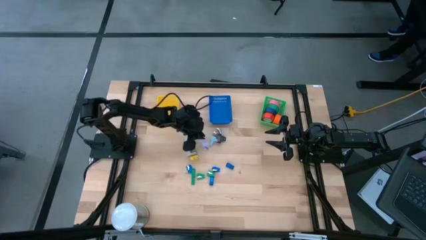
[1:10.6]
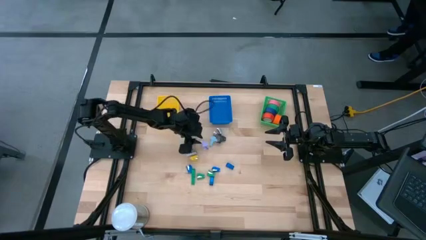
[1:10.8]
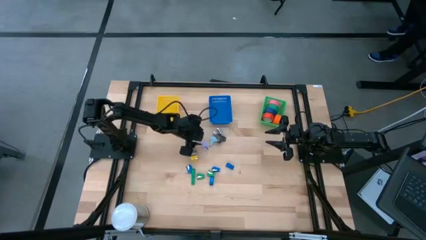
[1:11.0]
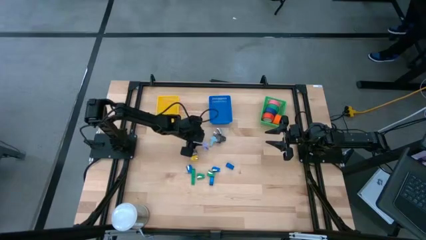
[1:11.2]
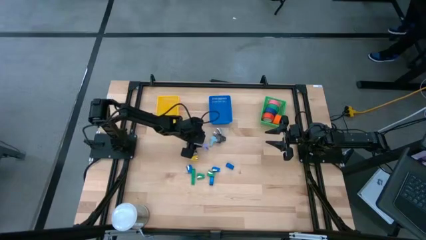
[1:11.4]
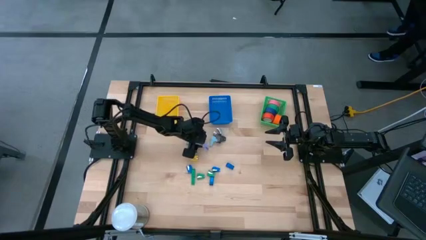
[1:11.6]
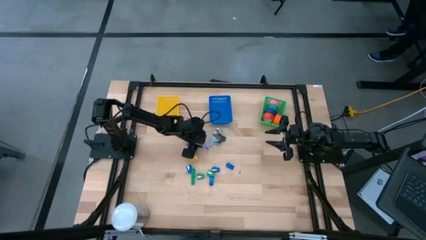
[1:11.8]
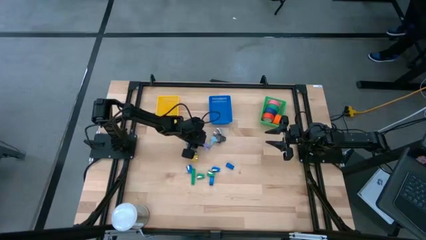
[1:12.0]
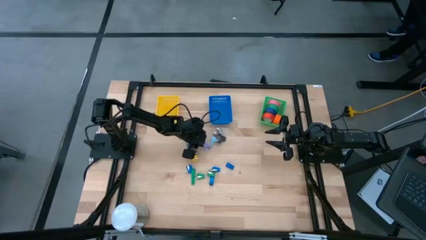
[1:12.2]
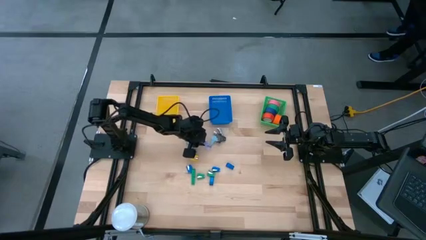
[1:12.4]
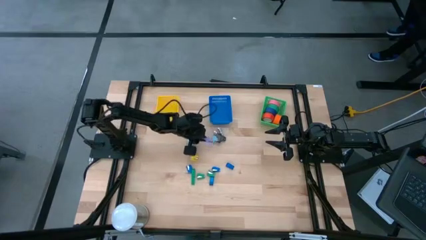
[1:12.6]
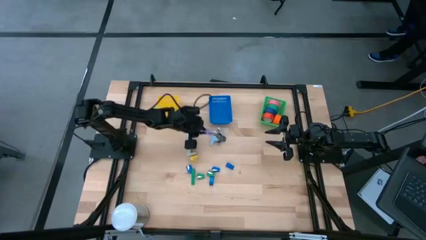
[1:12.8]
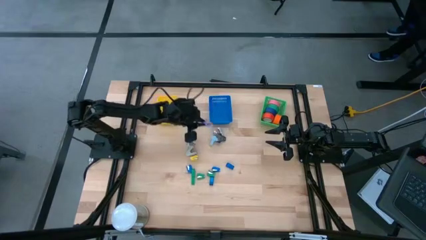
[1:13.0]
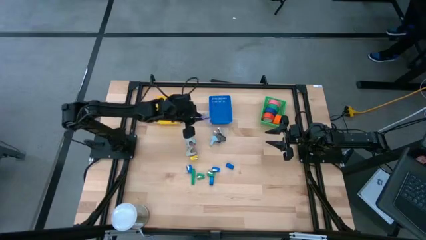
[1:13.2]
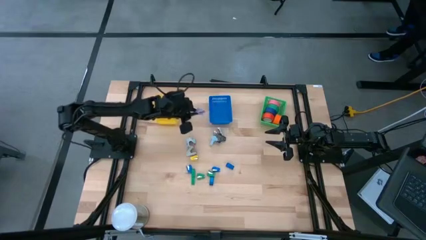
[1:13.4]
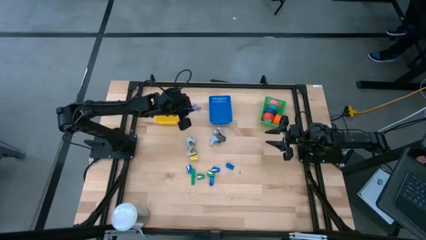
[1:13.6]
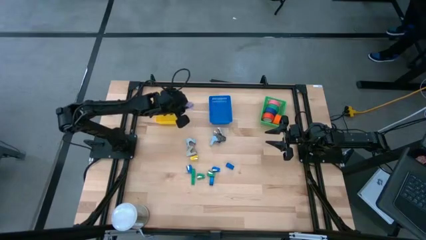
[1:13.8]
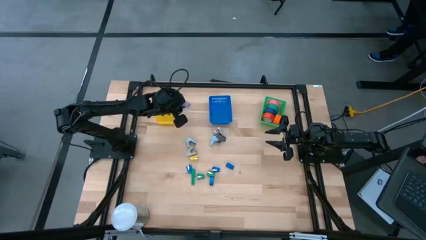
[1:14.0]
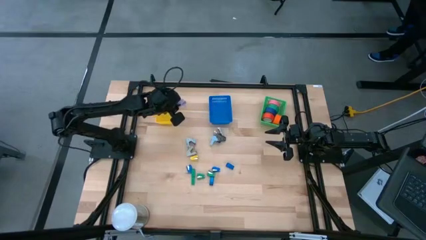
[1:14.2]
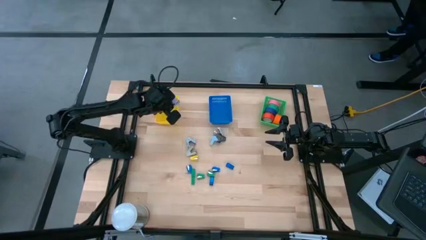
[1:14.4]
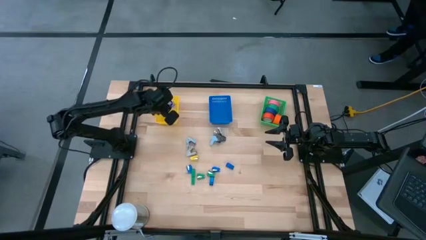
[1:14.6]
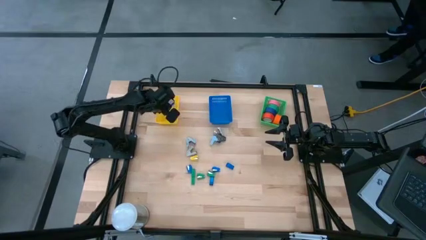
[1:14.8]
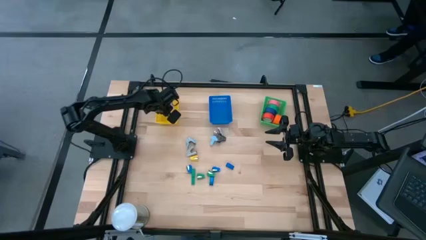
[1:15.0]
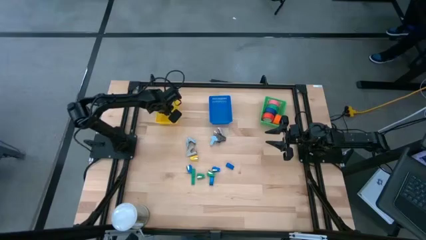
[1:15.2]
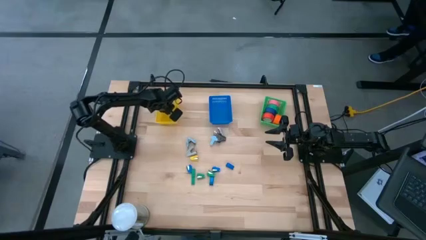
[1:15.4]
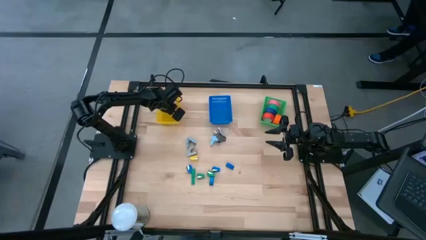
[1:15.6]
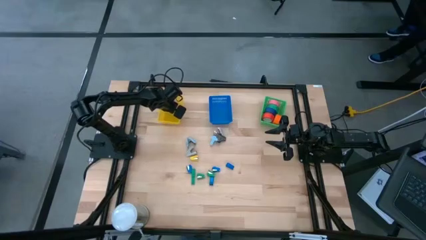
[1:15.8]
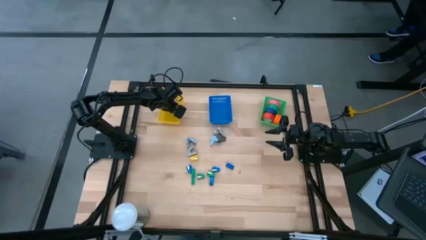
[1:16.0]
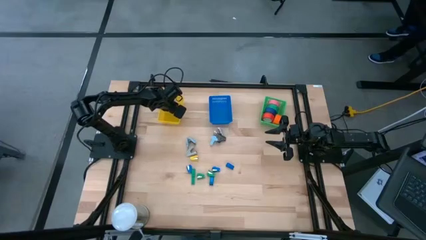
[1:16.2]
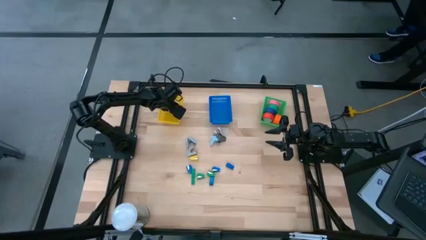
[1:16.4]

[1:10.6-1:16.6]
Task: Pick and place Stapler, Stapler remover, tape
Put the violet stapler remover into the yellow basket

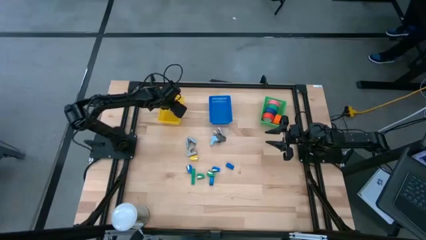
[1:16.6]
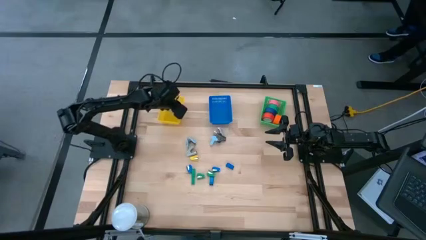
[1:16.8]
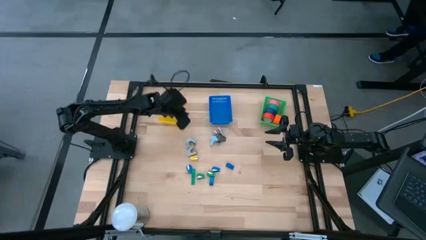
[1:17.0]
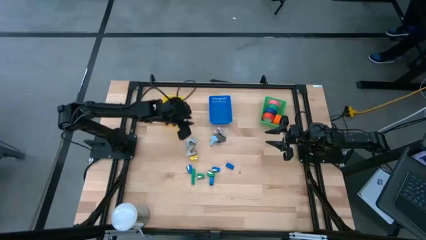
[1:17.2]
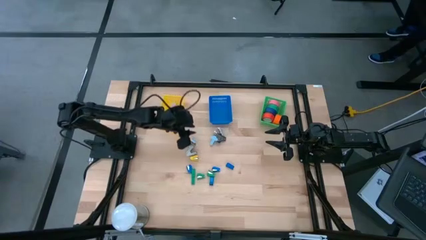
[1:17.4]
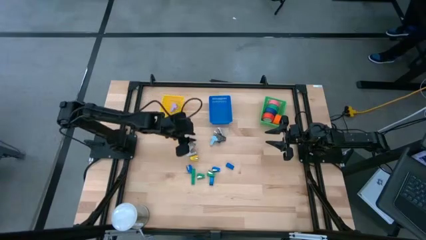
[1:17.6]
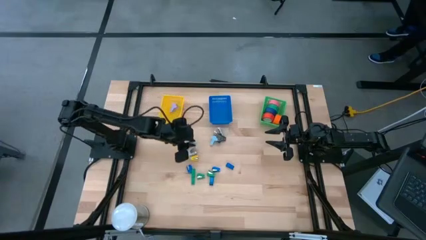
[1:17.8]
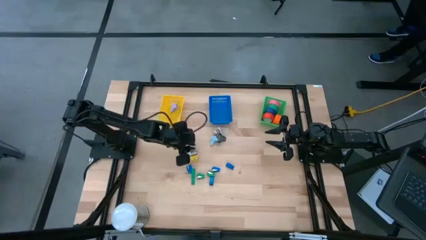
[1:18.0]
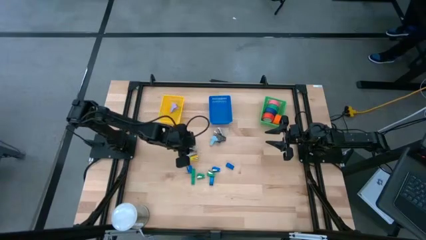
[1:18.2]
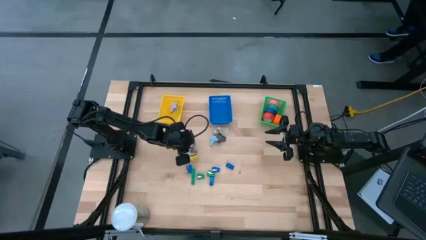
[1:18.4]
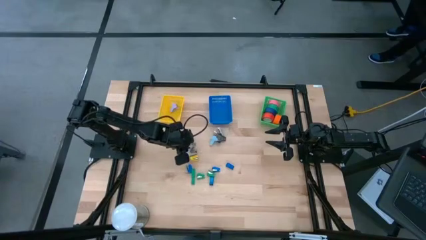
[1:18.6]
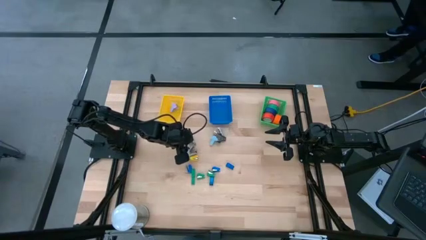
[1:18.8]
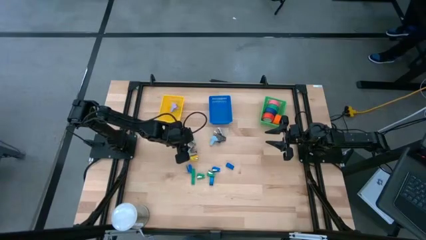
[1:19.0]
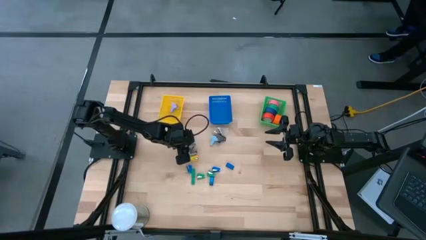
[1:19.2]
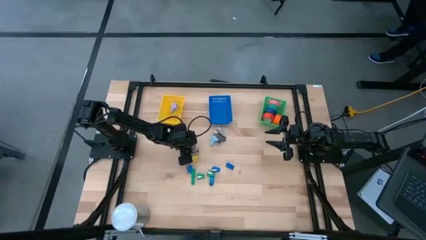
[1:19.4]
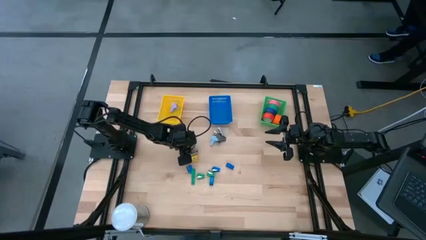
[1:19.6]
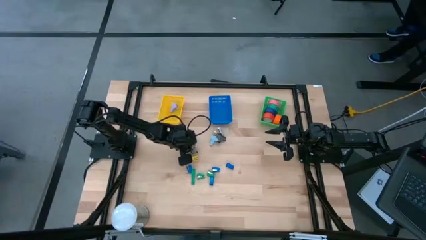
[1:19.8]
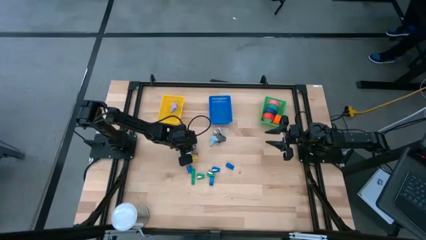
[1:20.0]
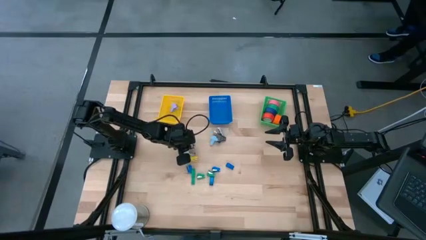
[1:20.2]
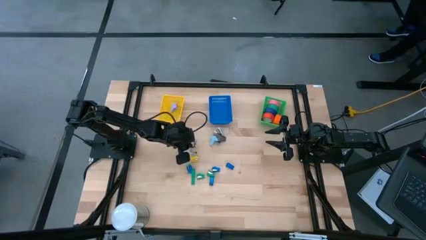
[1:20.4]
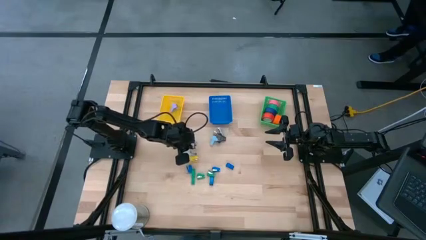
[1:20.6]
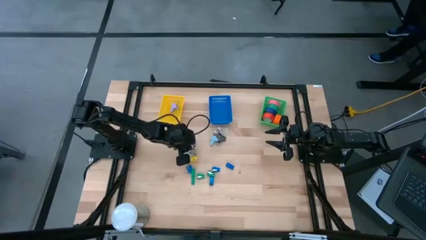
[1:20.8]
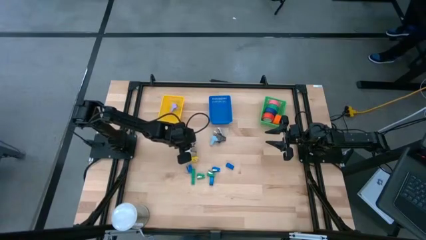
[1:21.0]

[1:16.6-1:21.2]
Put the gray staple remover into the yellow basket

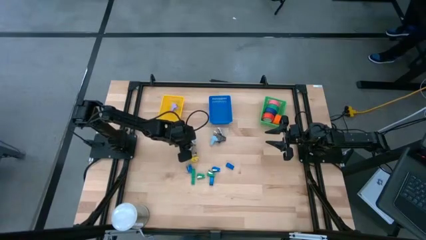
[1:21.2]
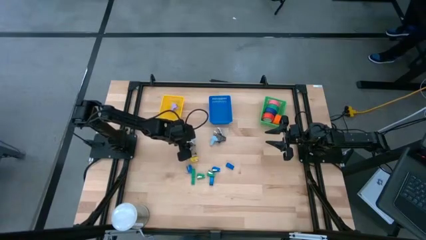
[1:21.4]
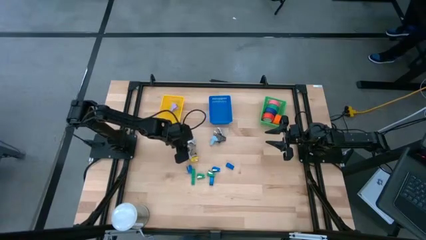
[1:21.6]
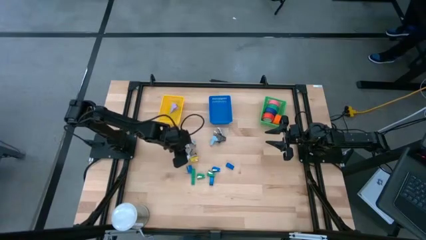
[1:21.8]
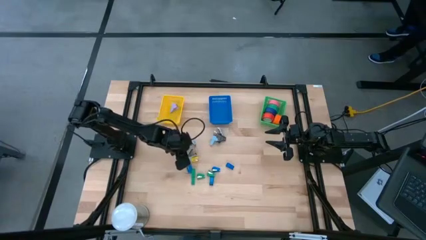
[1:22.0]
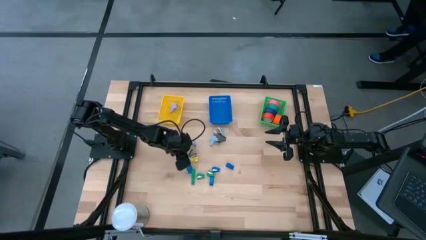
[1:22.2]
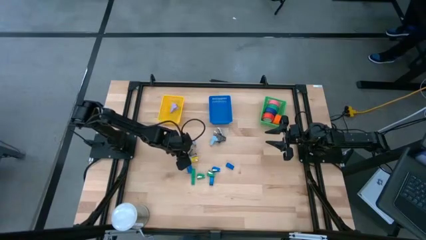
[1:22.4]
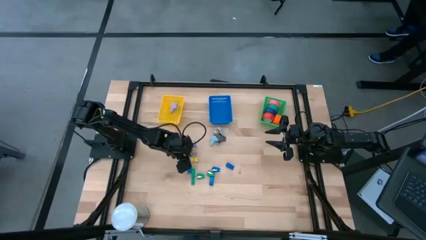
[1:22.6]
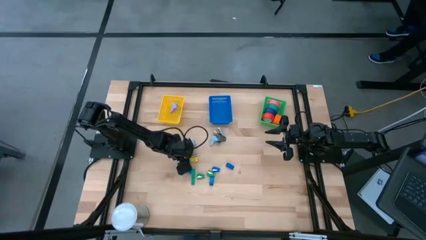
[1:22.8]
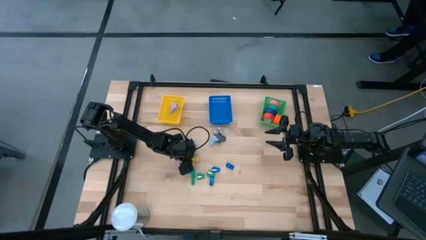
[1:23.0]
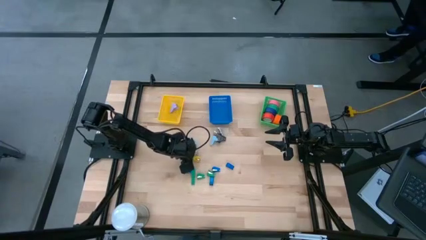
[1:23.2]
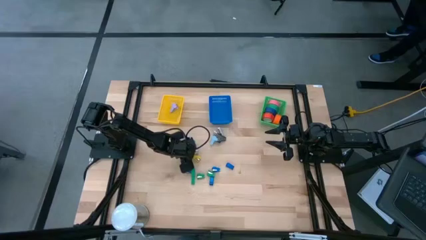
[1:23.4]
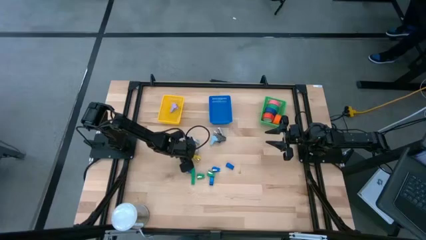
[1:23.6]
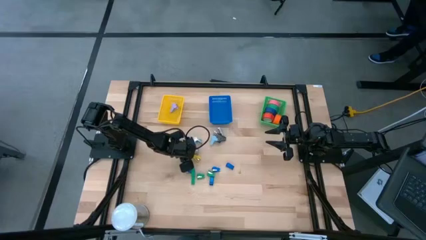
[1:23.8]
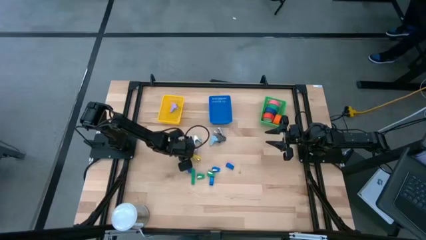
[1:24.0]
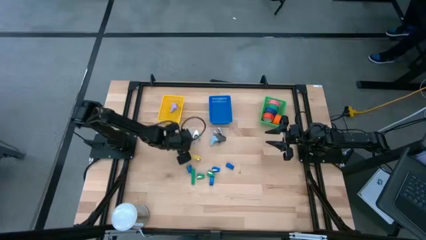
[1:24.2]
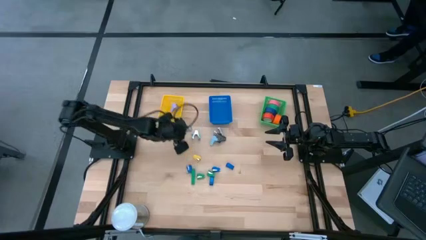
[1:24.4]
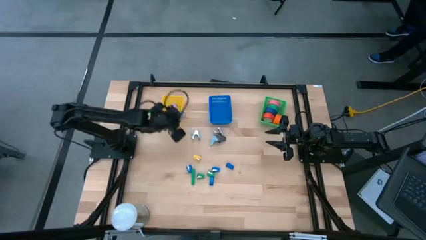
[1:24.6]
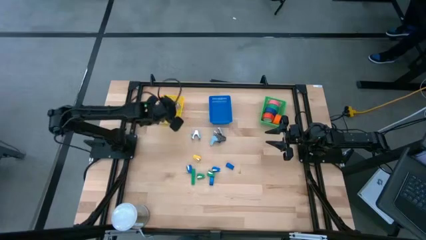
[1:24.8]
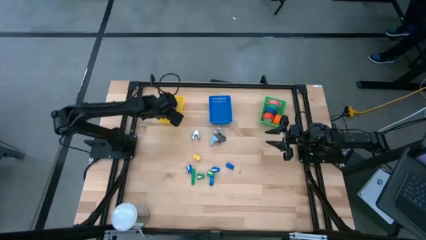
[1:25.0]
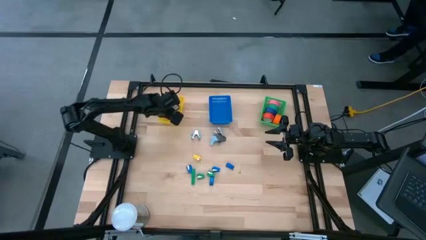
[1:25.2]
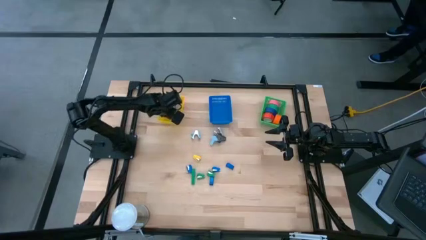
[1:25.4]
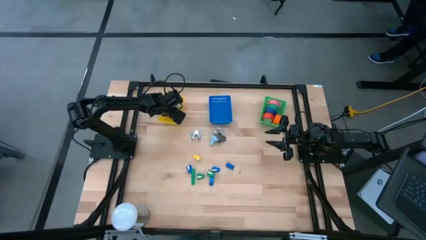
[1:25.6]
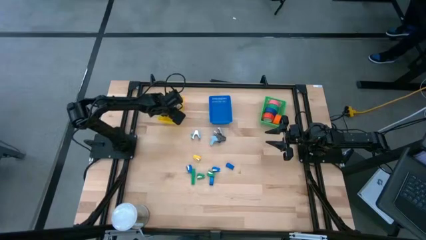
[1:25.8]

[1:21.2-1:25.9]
Put the gray staple remover into the yellow basket

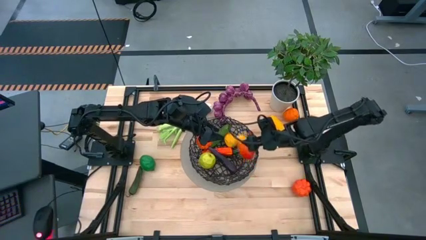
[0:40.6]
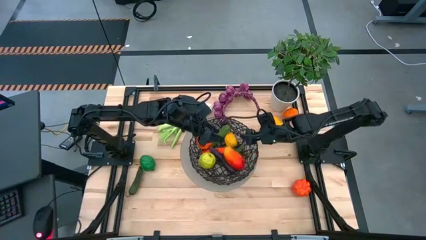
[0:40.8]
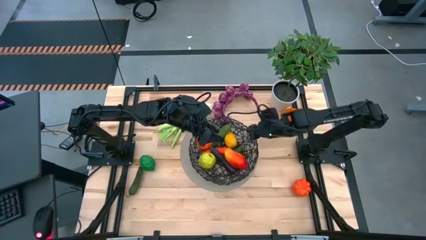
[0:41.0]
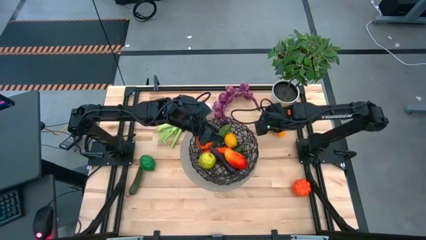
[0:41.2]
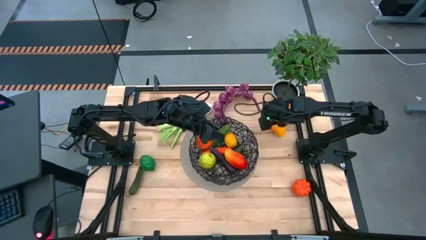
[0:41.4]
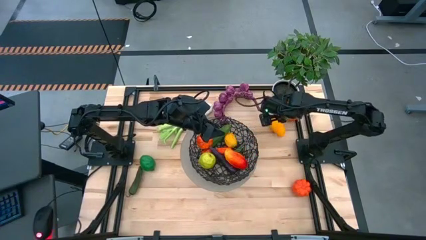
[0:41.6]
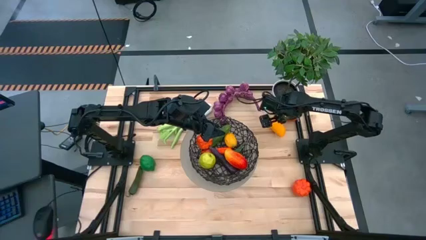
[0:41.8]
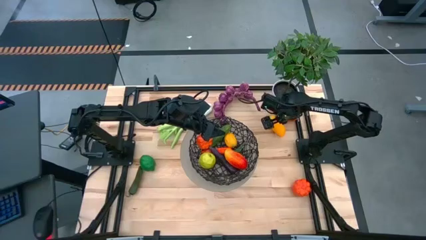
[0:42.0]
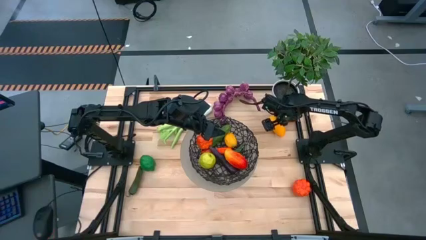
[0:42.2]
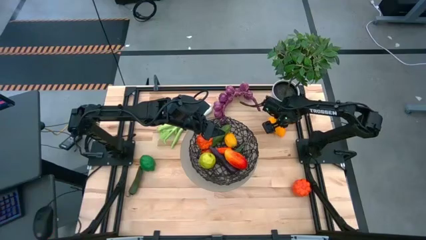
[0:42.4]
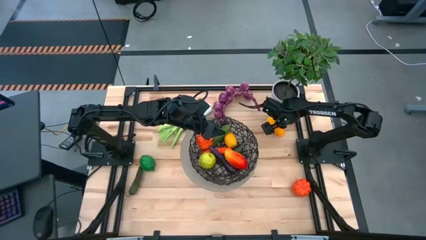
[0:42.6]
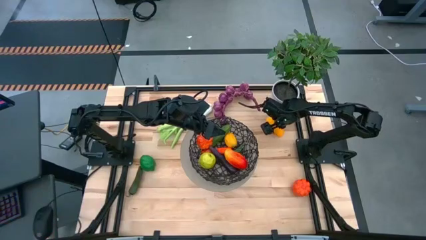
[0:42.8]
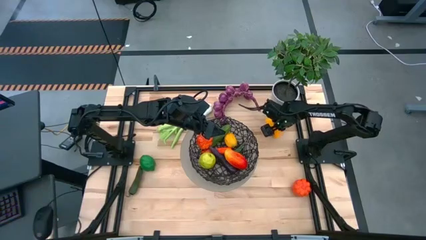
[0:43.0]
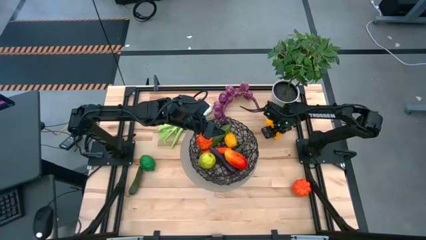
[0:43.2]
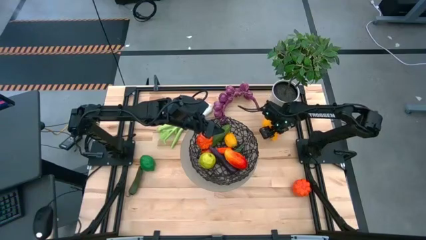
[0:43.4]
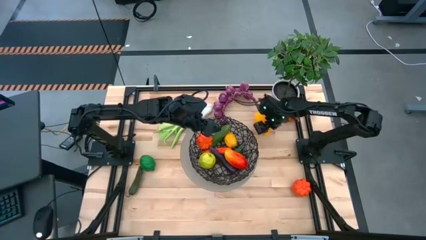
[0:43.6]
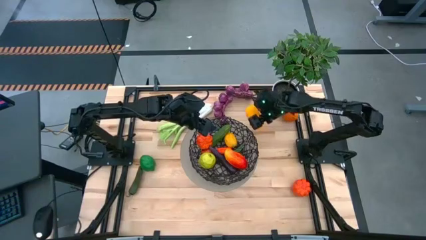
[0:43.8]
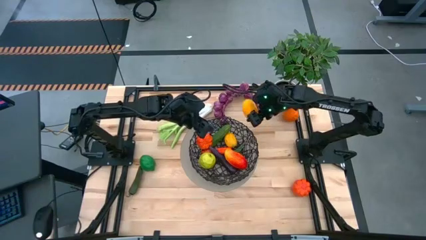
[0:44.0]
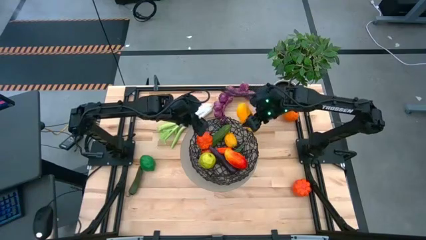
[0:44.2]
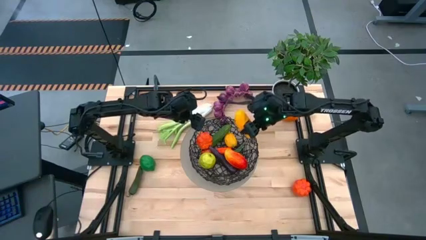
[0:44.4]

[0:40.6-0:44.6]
Task: Build produce basket
Put the yellow mango into the black wire basket
